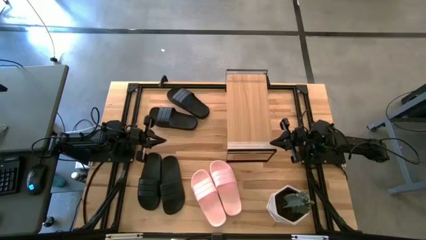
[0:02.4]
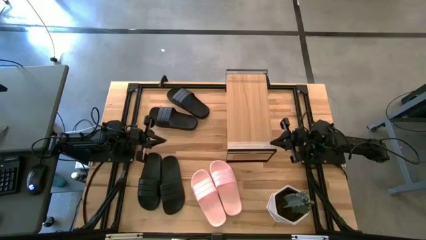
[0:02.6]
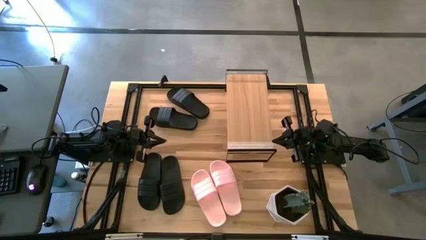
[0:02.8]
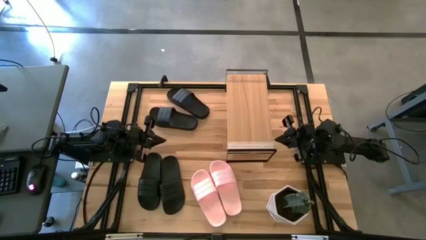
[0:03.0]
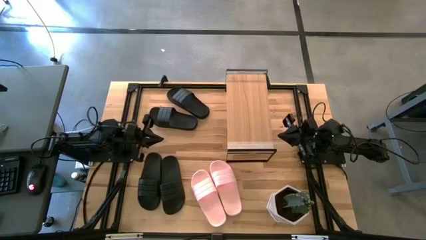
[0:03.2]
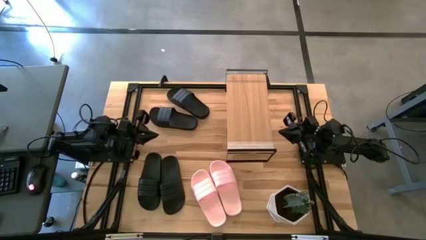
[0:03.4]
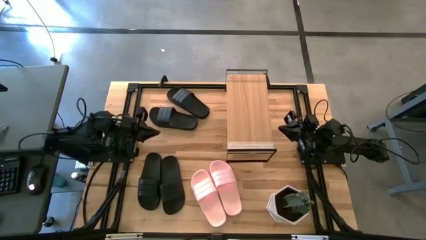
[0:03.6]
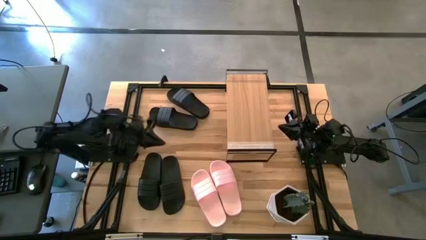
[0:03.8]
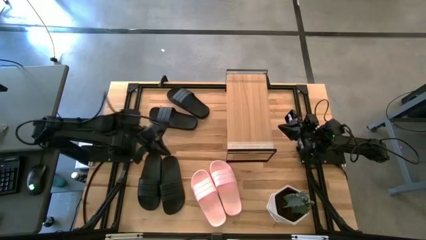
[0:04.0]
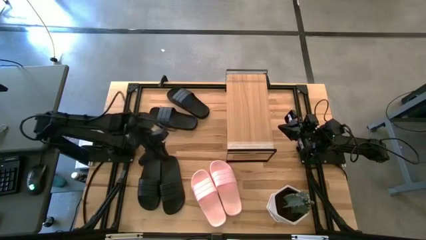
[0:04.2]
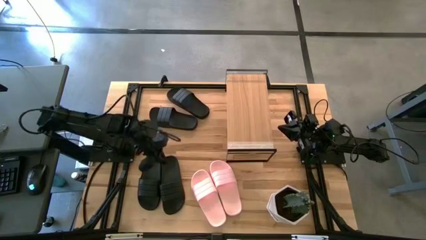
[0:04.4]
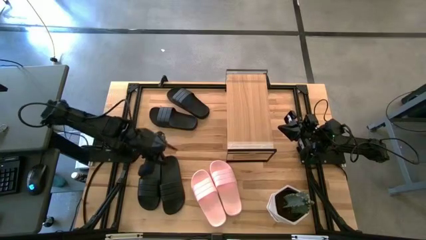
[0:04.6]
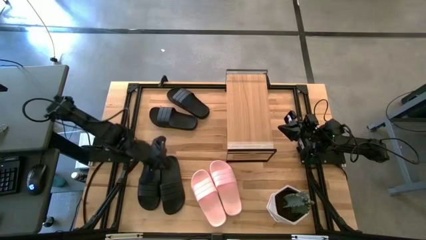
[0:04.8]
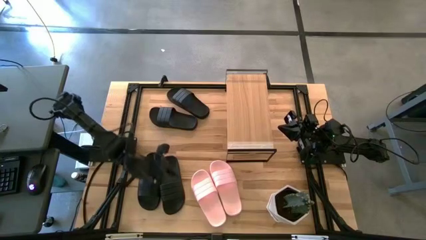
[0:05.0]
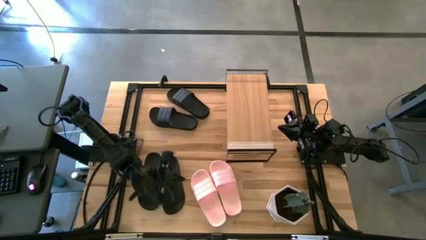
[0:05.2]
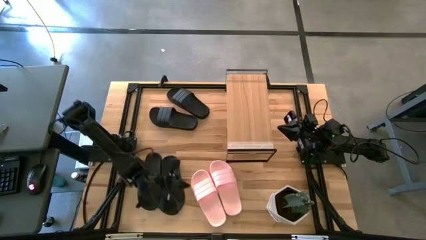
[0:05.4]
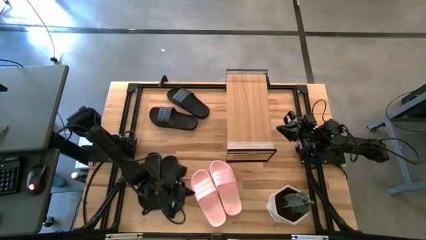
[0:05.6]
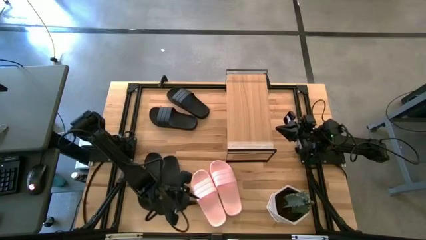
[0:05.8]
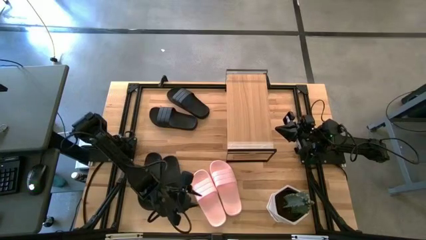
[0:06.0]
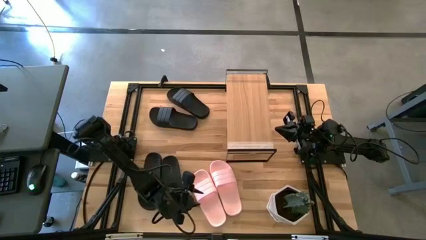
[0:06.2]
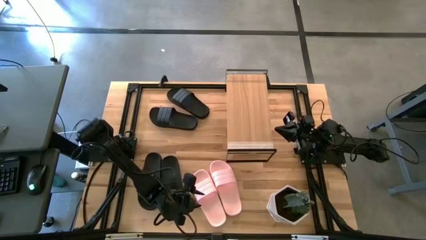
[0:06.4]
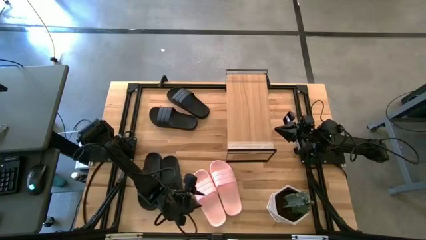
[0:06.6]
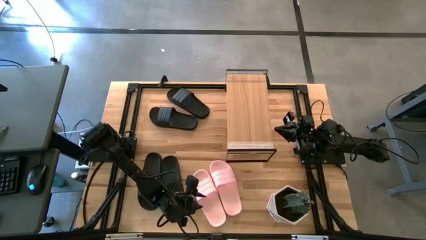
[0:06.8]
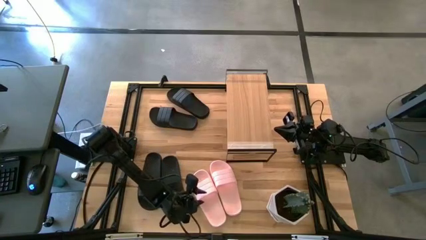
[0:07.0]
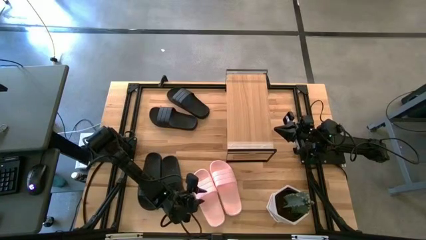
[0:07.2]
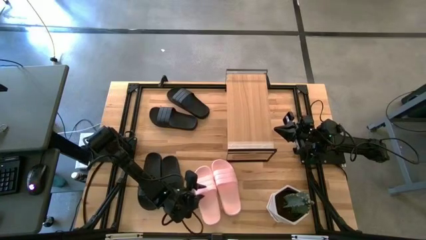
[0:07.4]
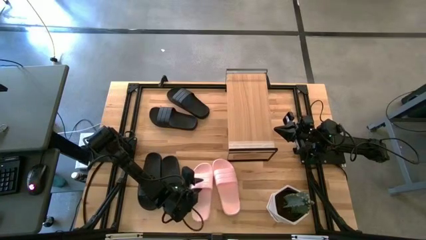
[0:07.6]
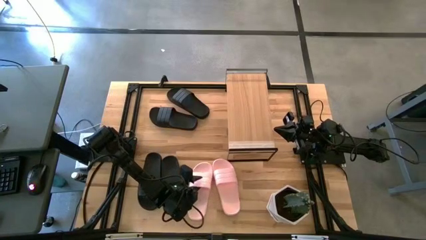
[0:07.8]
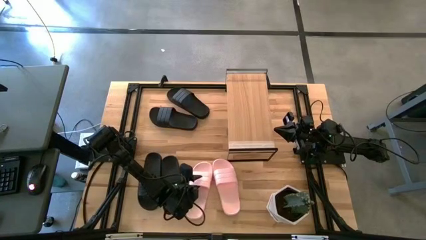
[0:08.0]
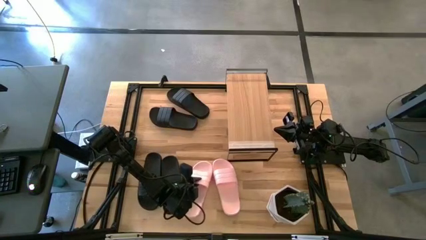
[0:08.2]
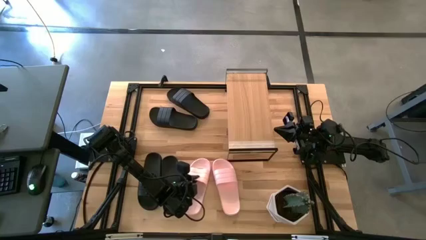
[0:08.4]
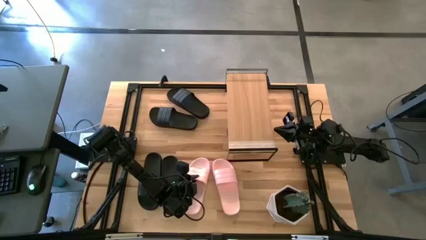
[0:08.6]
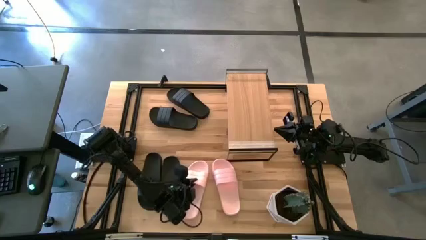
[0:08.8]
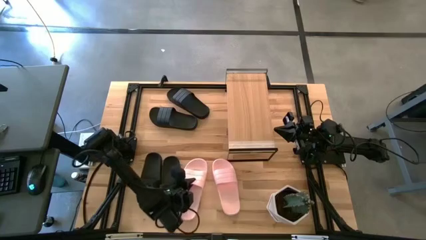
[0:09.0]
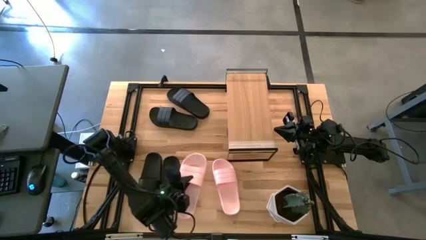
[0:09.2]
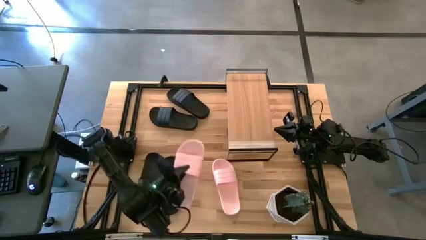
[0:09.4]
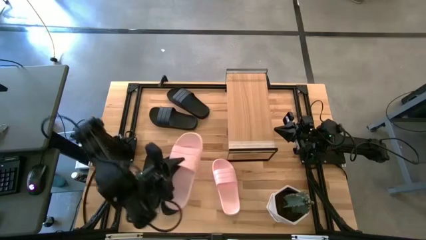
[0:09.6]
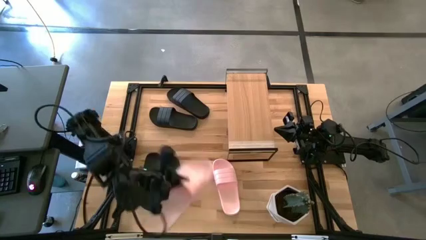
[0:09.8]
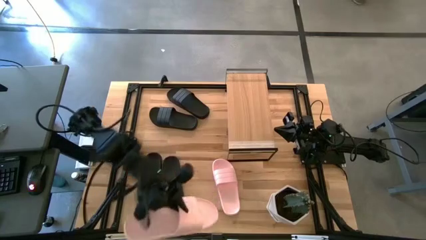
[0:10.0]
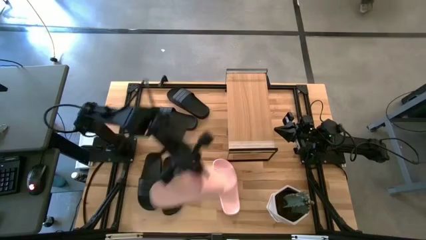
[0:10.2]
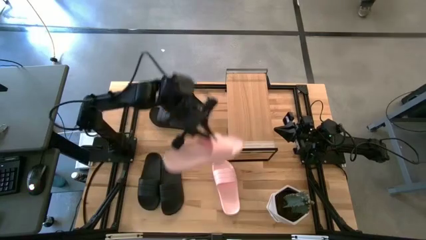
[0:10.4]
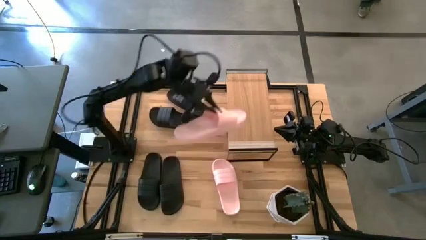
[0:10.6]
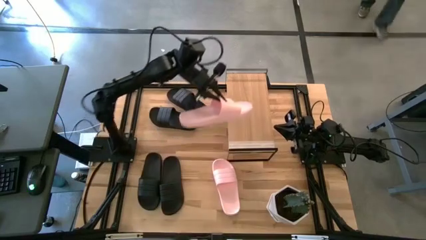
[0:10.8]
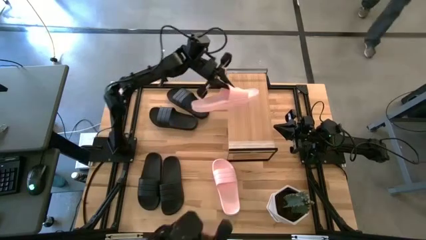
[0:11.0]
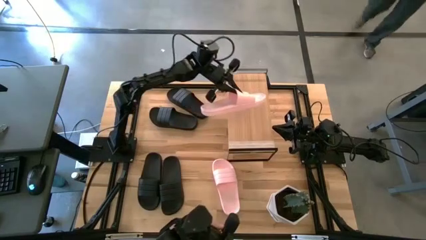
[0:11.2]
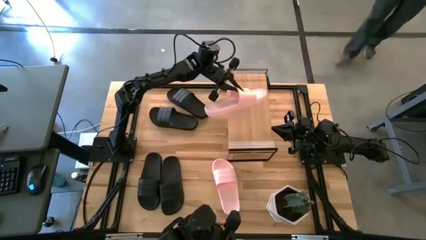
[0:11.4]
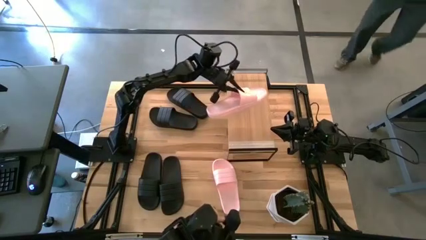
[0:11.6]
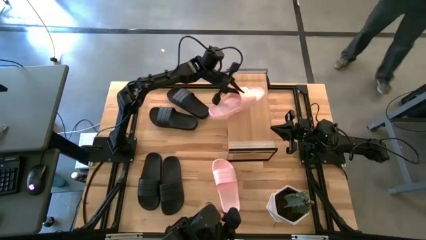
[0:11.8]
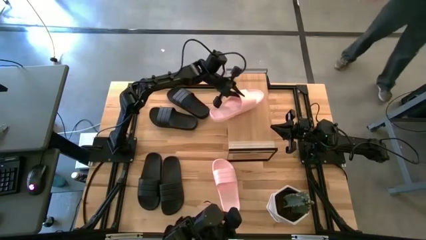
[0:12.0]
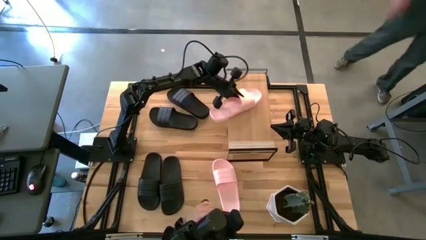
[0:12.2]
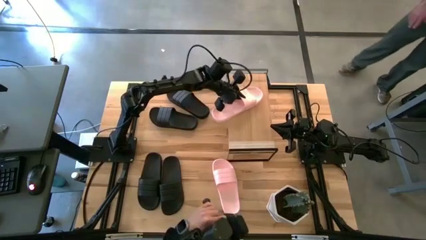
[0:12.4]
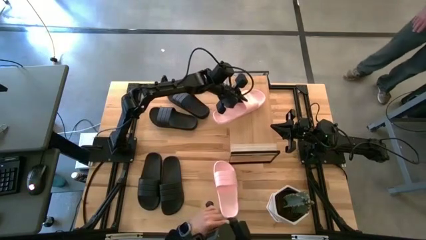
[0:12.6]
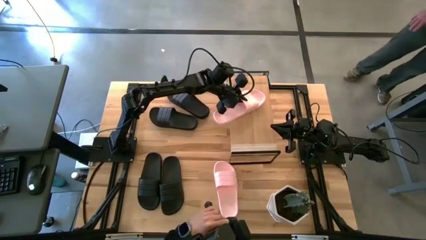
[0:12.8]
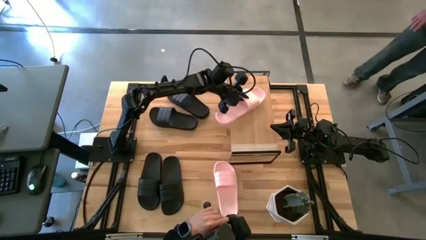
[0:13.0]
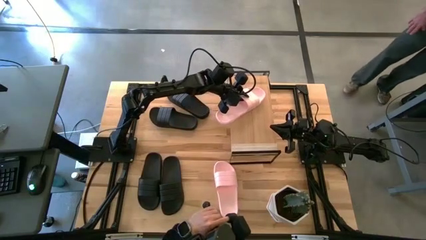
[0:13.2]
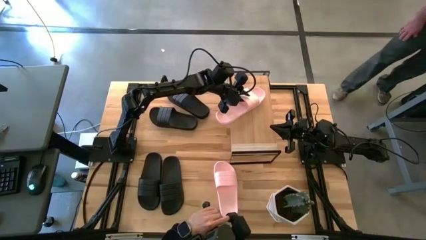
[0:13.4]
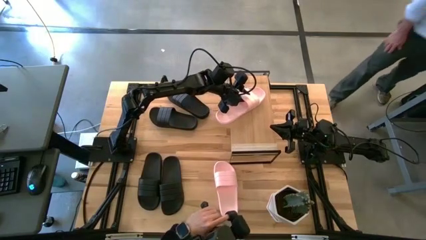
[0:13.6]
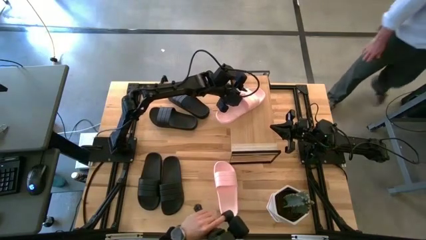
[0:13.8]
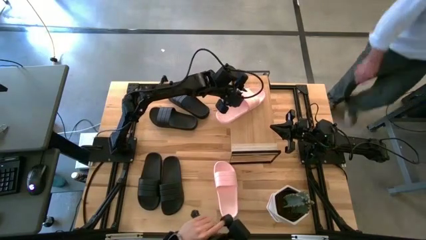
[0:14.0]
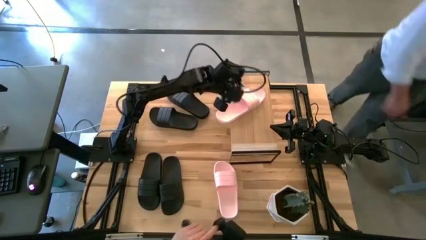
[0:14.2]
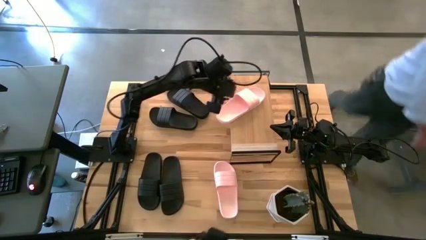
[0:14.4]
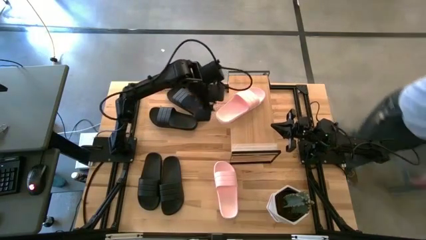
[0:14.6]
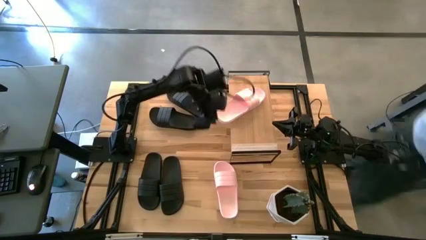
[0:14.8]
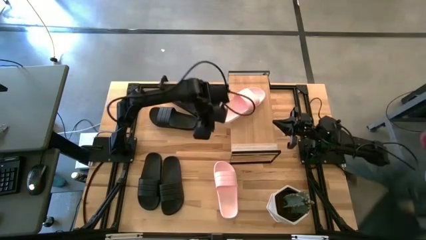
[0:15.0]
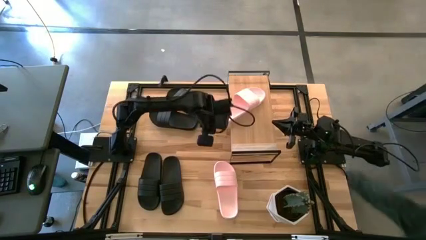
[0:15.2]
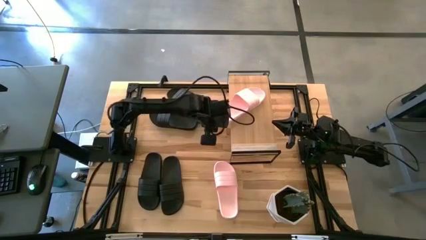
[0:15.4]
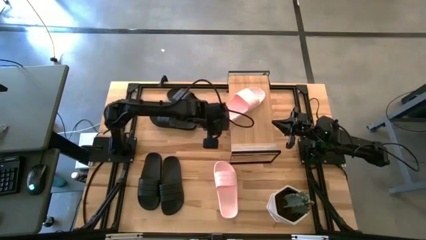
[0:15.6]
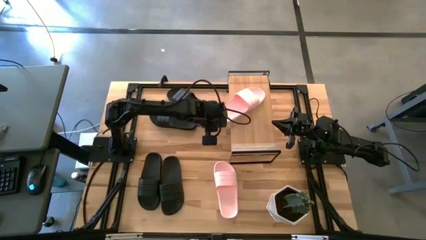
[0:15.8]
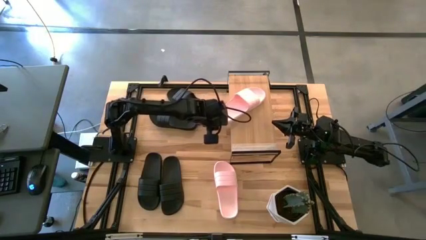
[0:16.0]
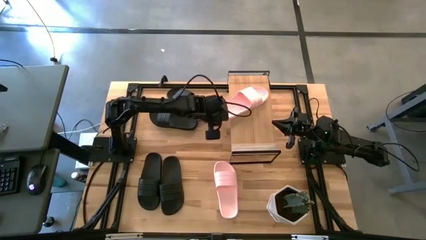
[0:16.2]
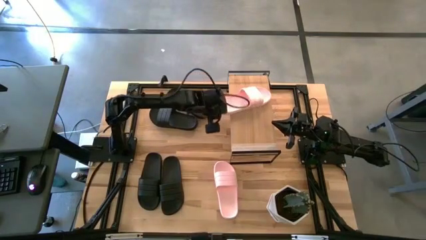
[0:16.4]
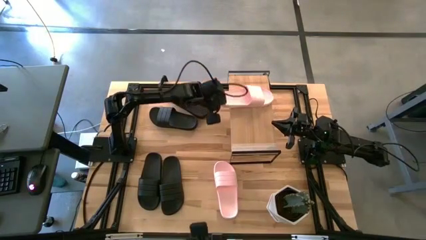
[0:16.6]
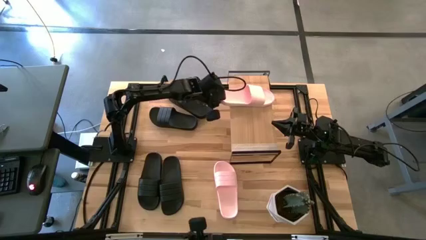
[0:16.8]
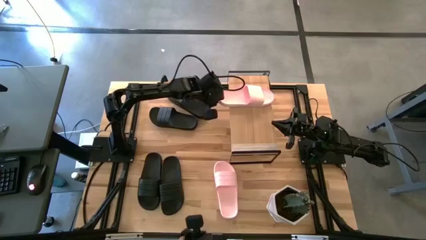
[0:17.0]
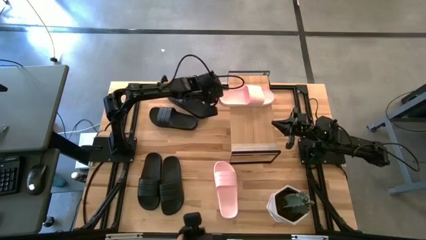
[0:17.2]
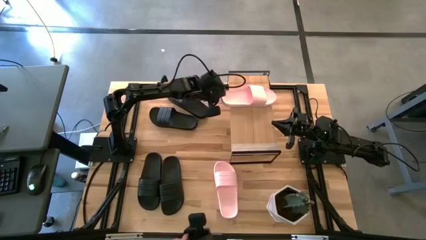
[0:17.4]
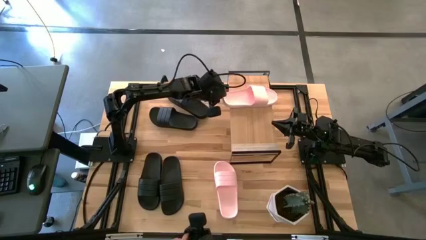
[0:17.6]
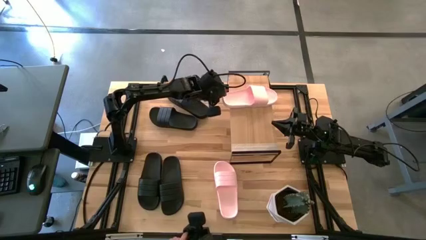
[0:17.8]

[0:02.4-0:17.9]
Task: Pick and place slides into the shelf
Put the pink slide on the shelf
